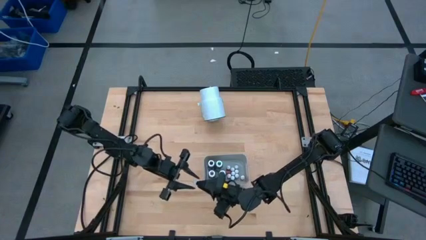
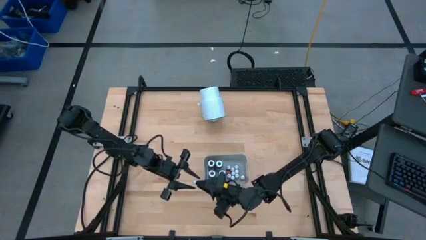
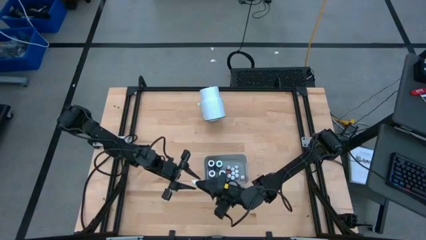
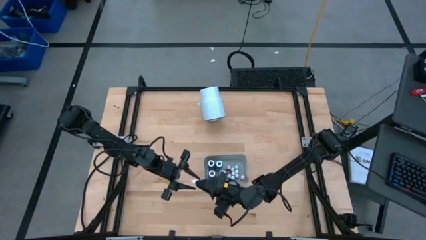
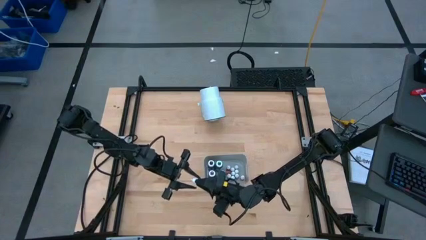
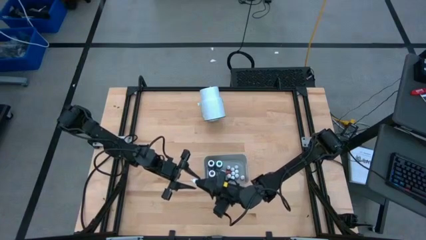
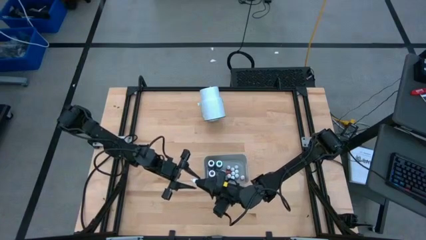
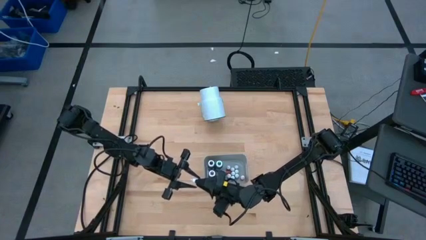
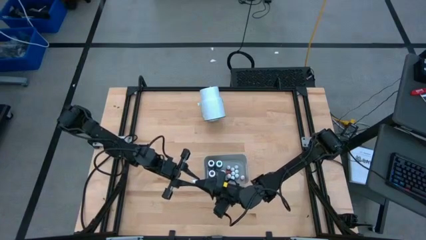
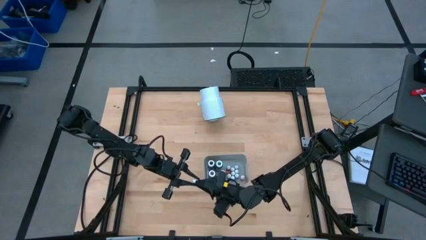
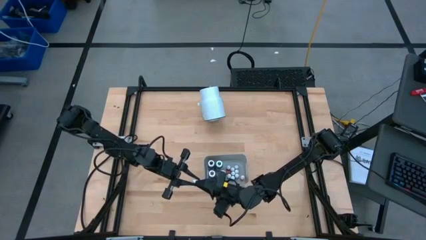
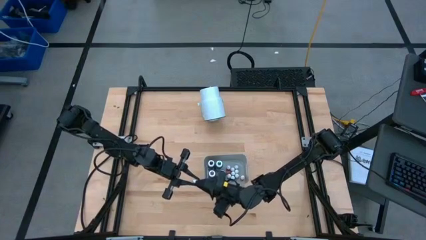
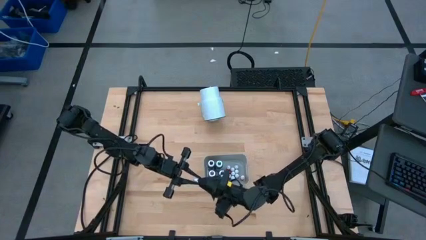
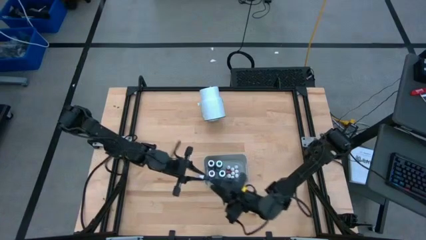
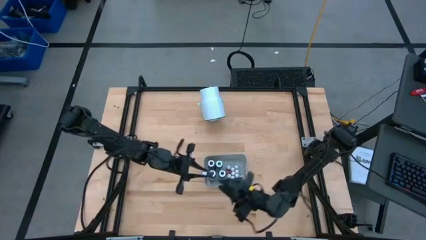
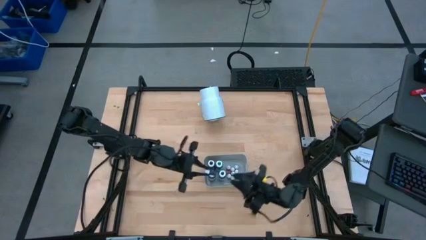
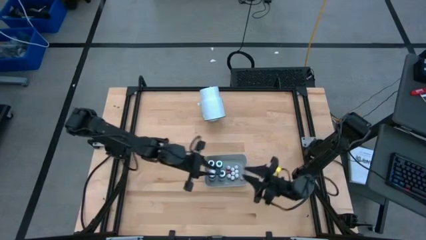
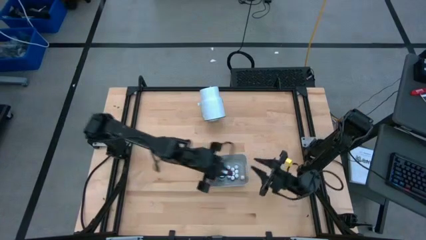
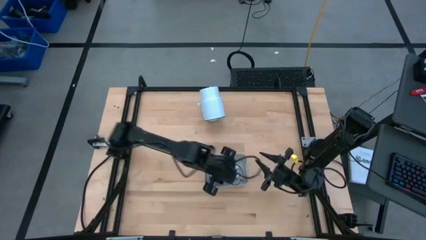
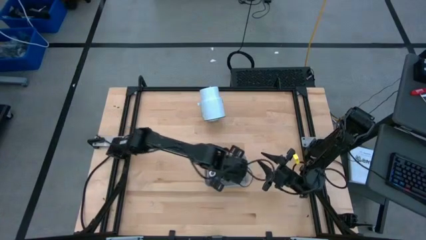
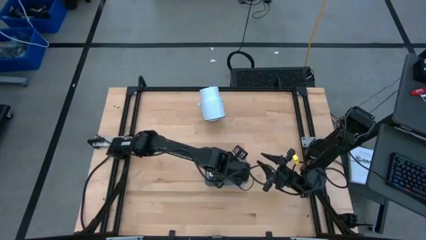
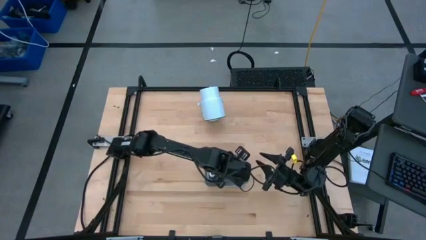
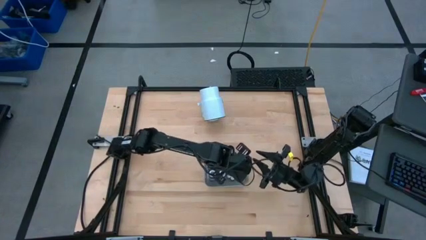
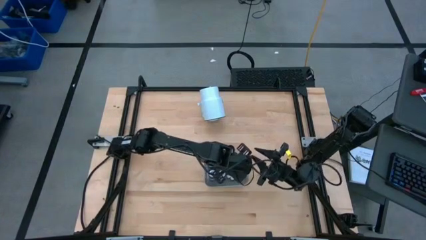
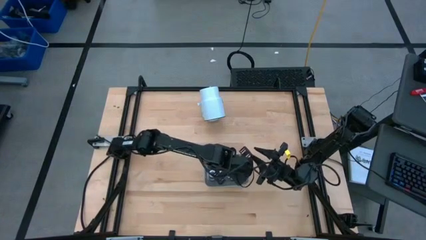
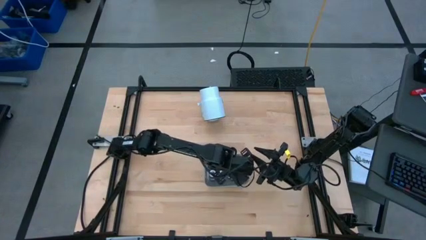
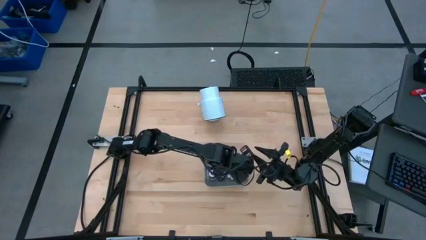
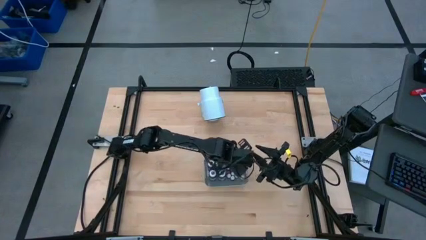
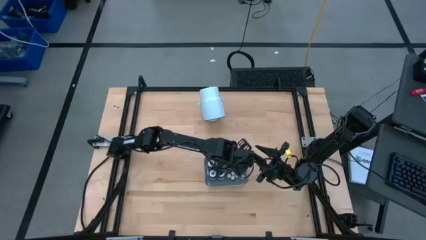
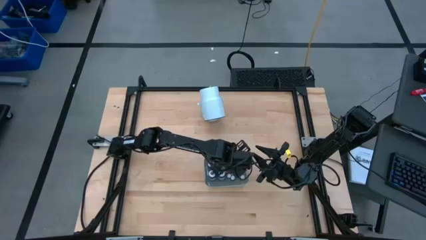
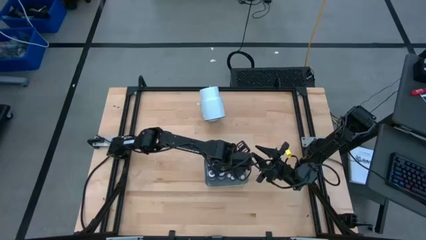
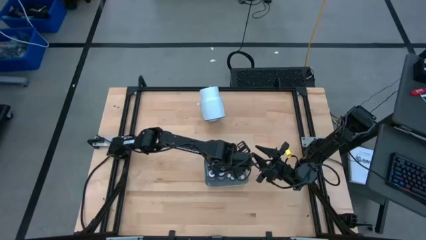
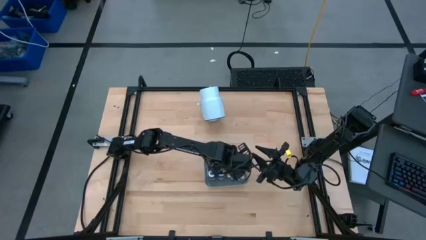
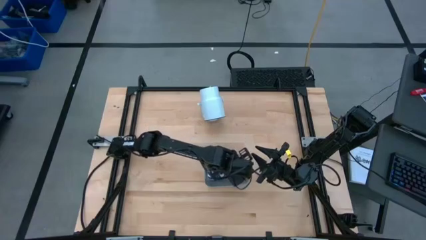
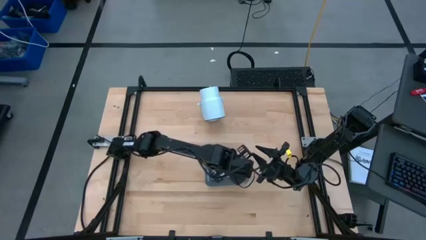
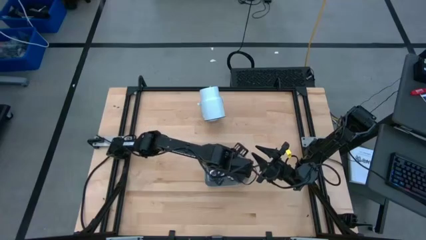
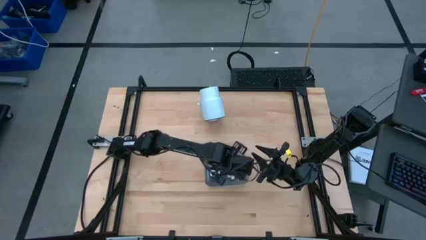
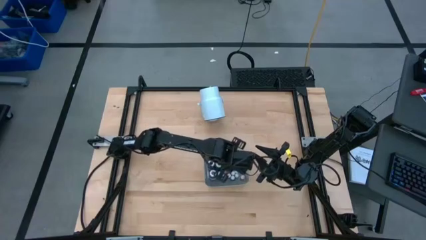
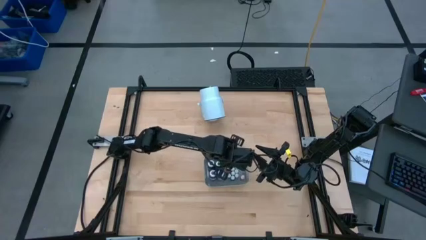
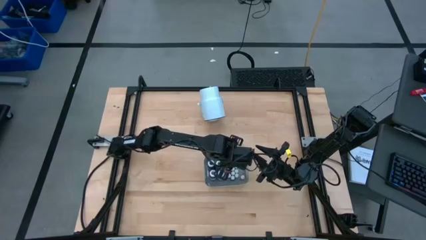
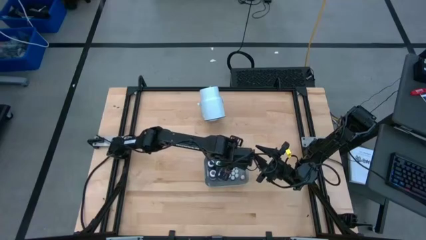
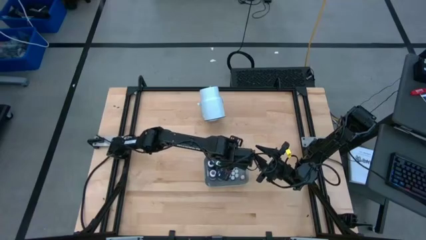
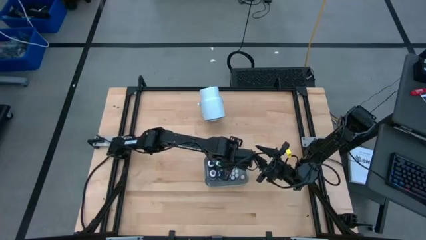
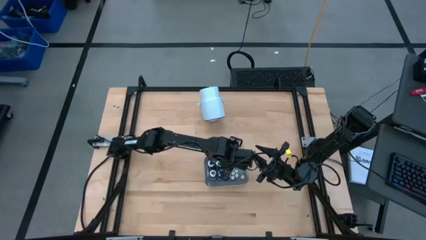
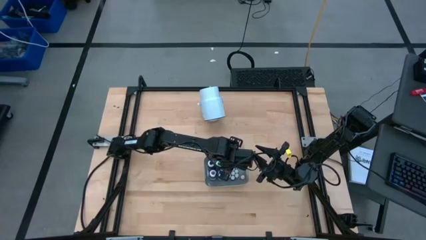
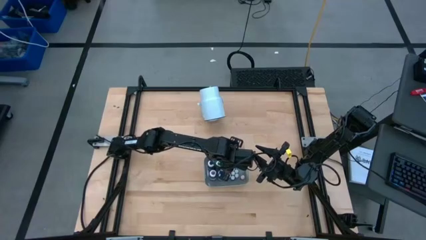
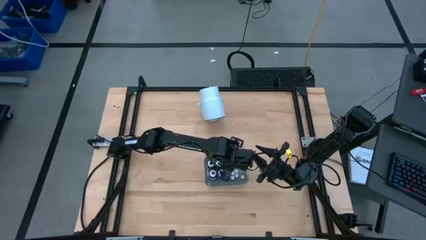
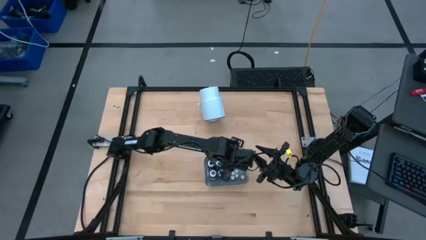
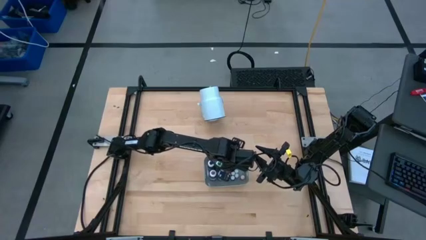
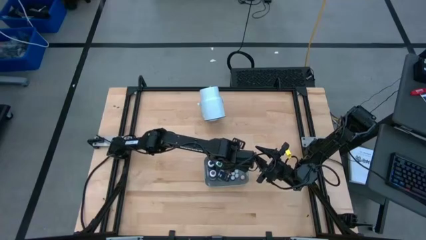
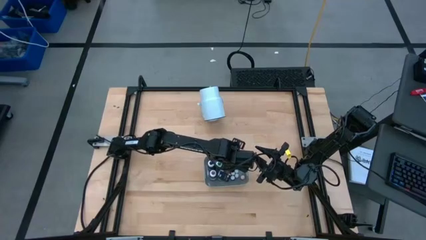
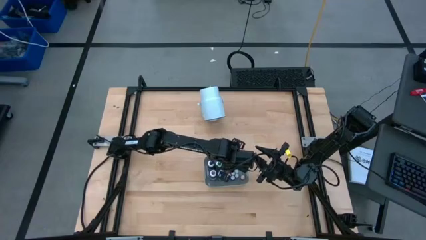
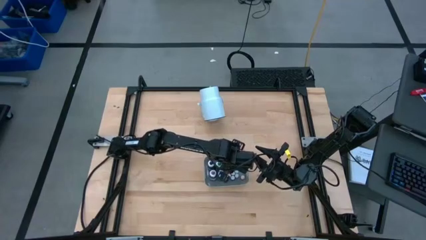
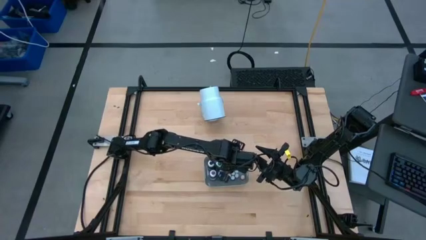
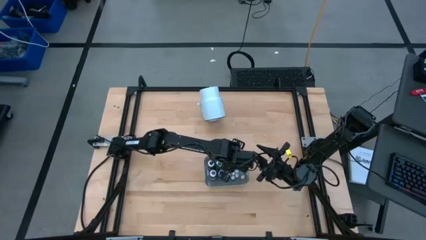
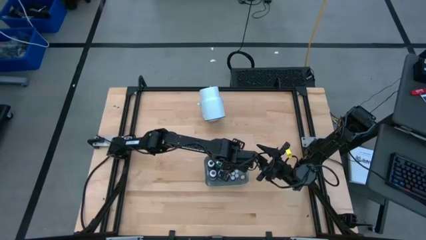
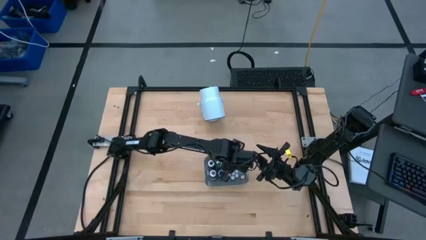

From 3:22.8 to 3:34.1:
Task: Pick & Place food coloring
Put the small green food coloring into the gray bin

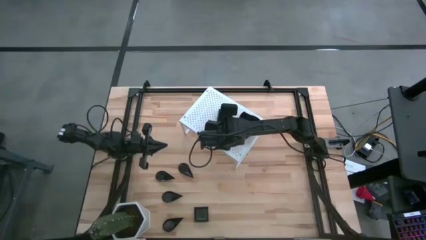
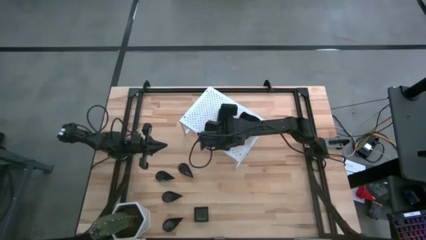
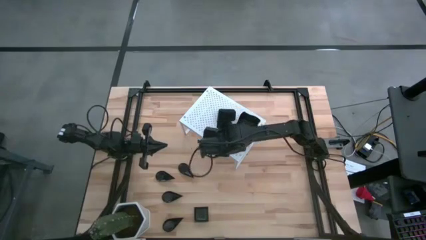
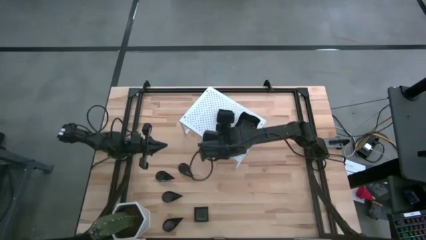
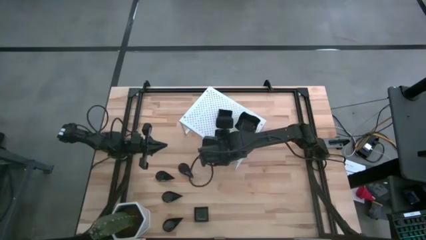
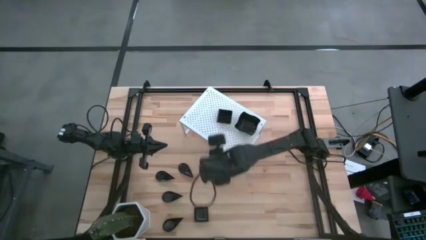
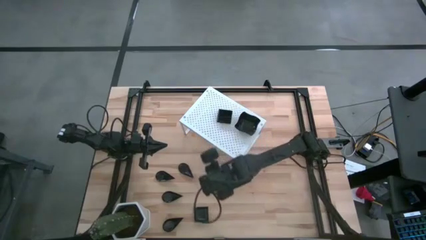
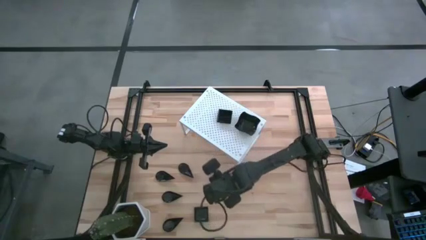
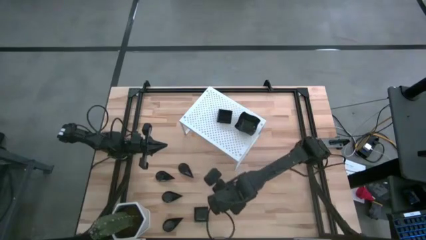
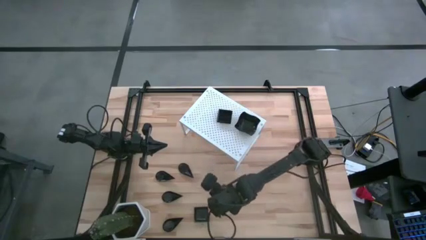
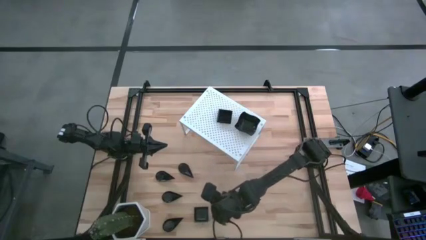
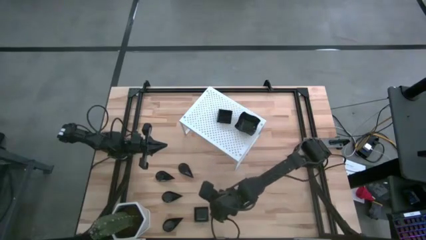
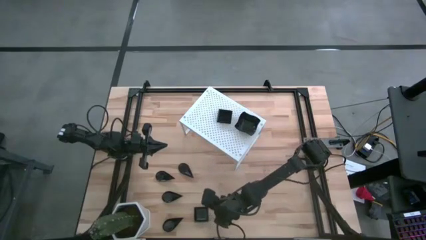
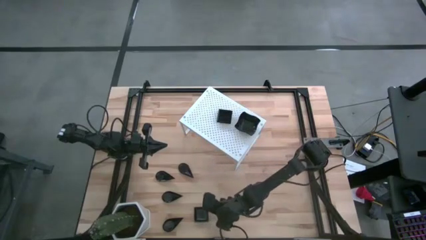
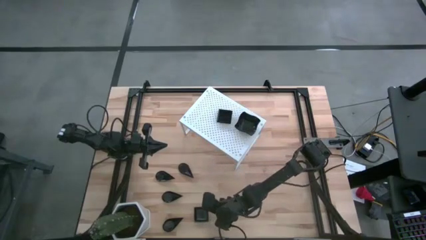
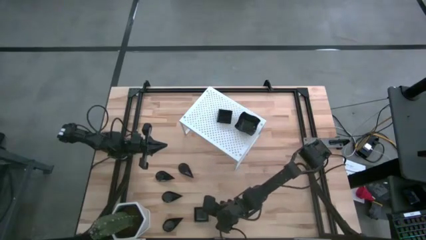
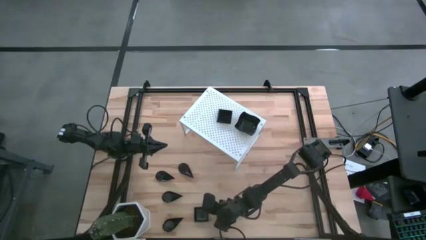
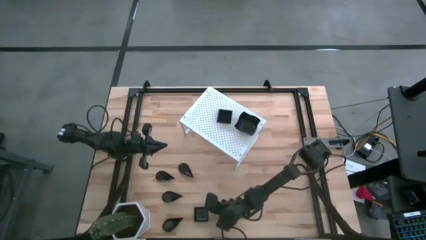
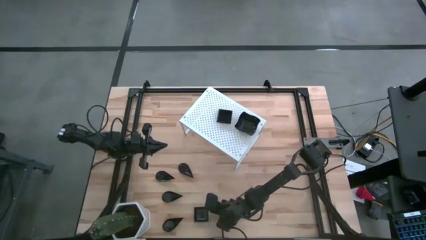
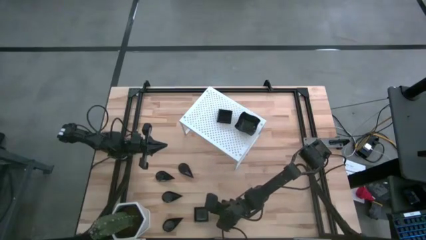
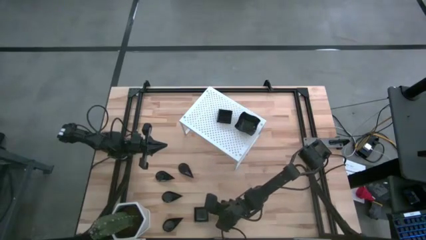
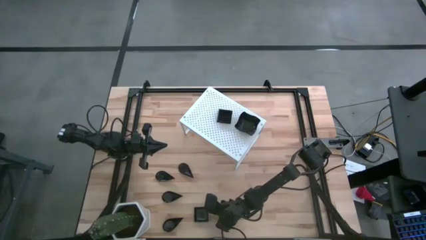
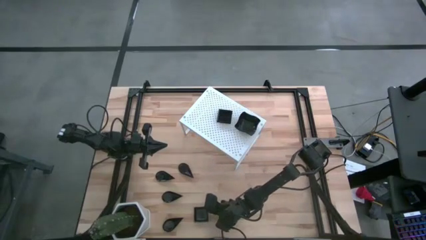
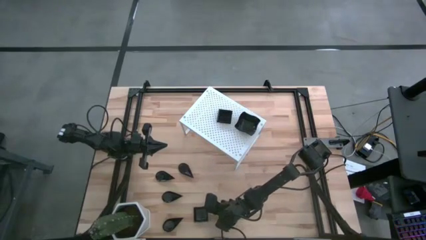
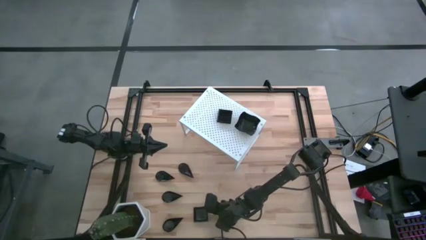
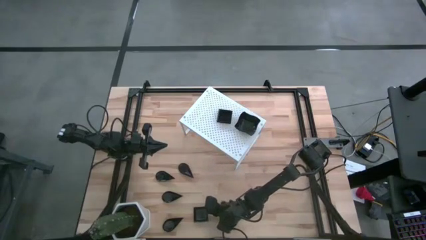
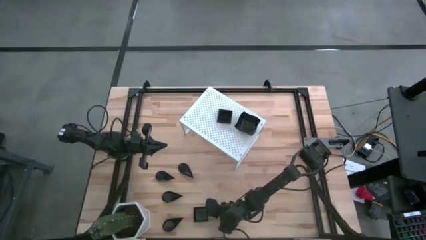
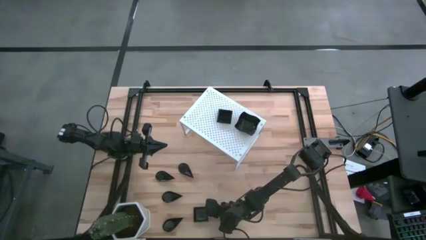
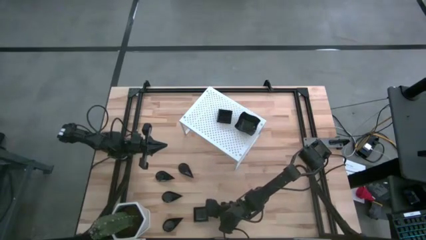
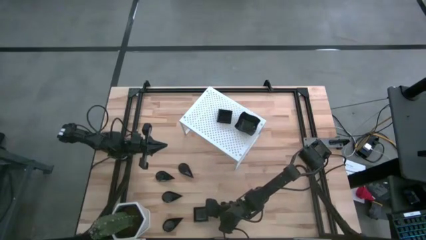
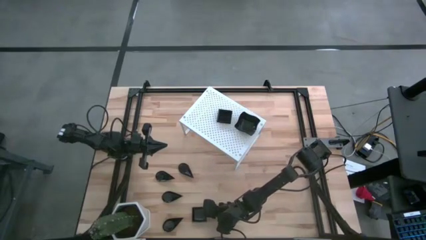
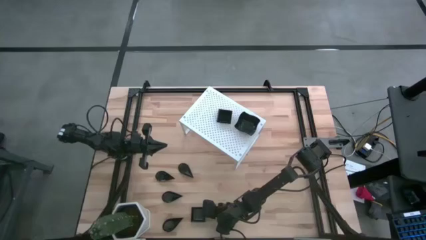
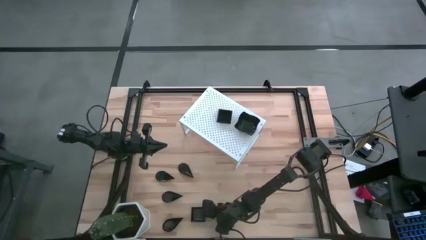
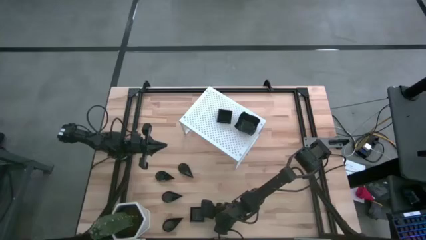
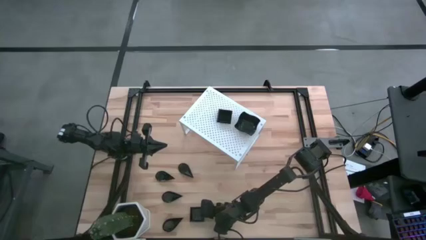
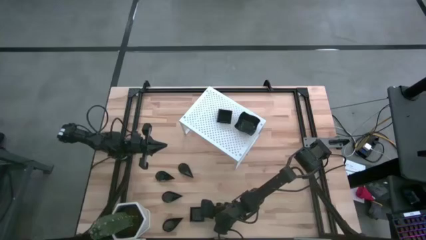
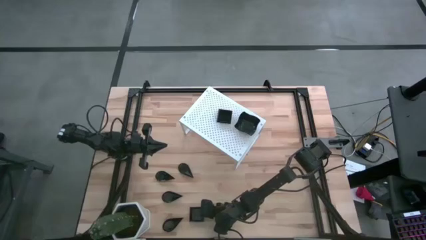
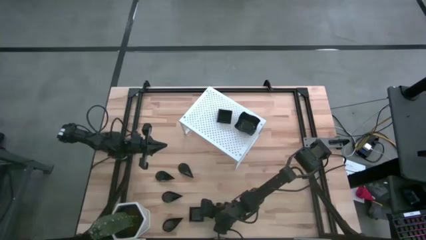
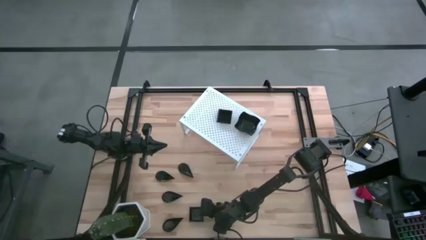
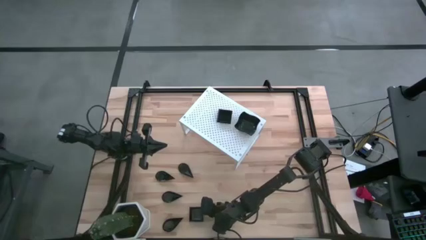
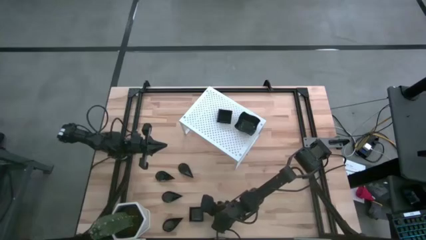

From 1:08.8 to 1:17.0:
Task: Pick & Place Mini shaped plates
Stack the square plate on top of the other square plates on the shelf
